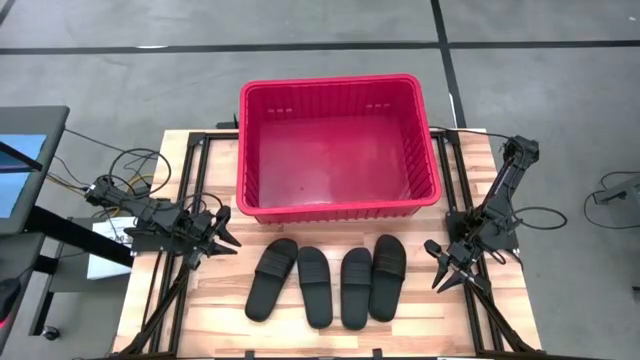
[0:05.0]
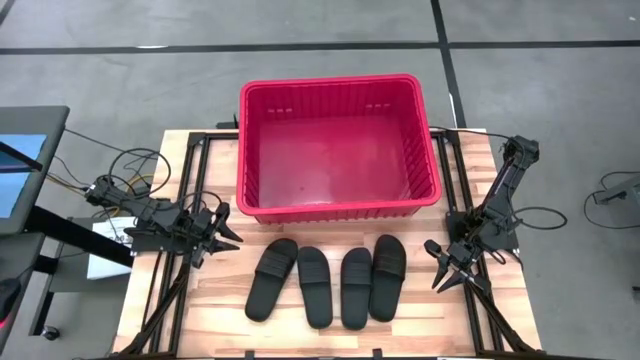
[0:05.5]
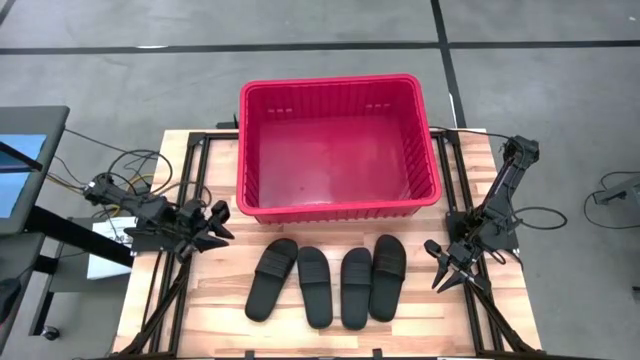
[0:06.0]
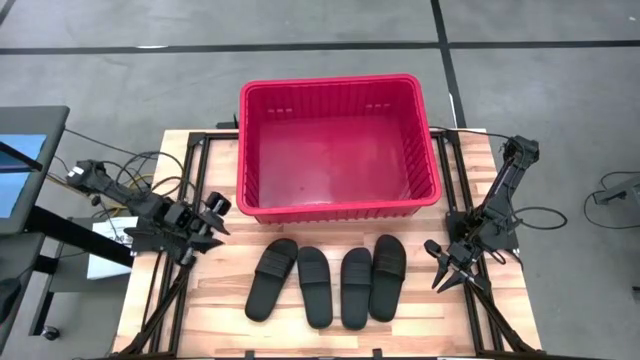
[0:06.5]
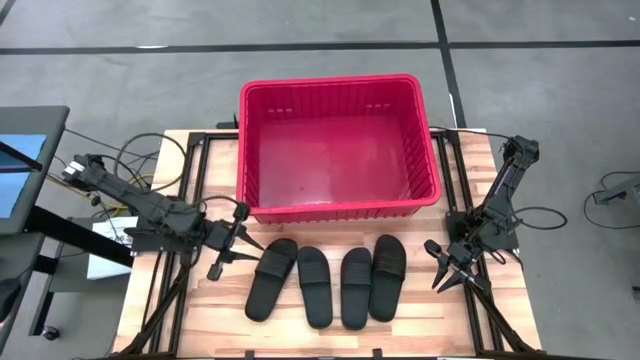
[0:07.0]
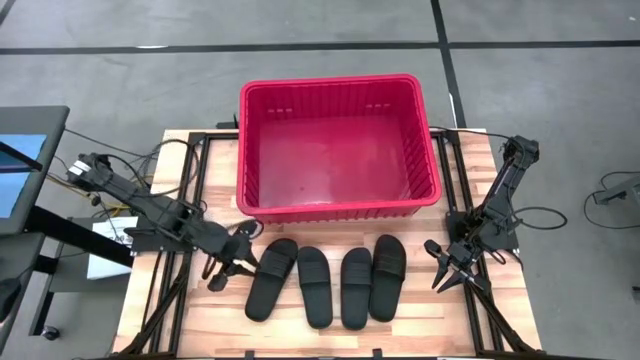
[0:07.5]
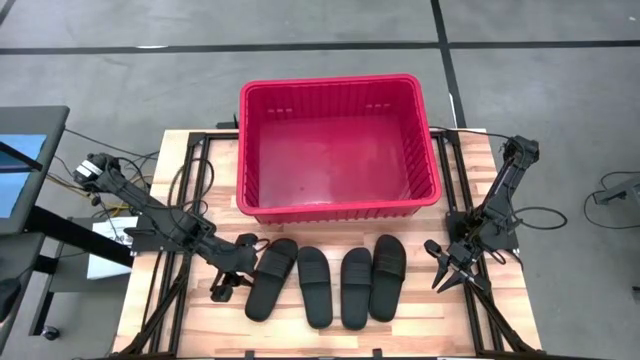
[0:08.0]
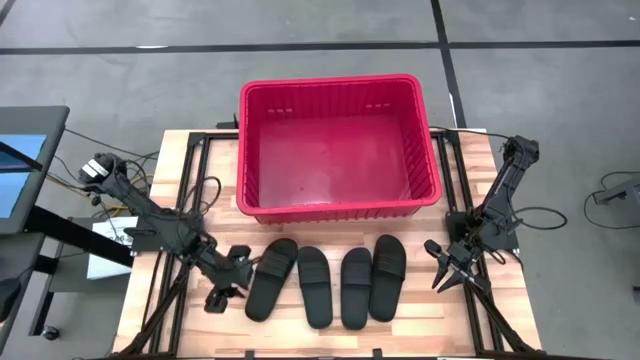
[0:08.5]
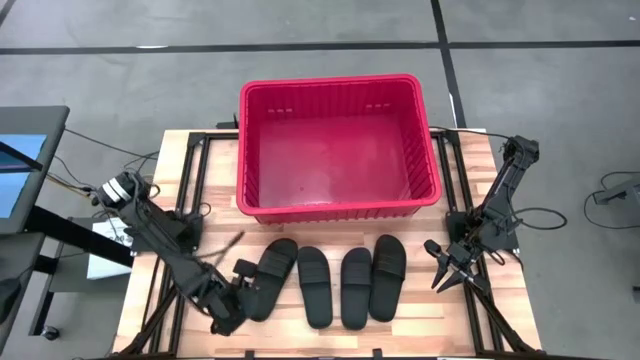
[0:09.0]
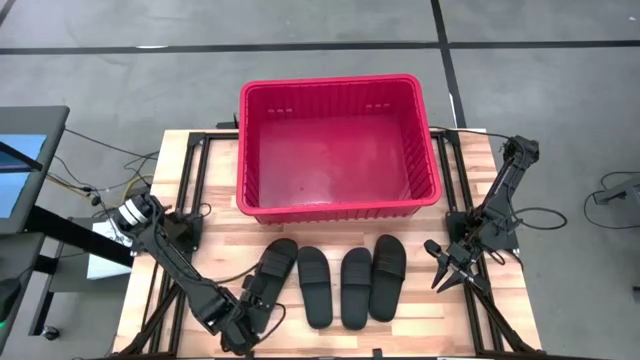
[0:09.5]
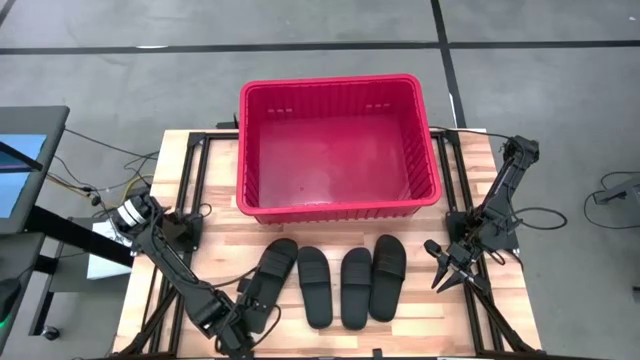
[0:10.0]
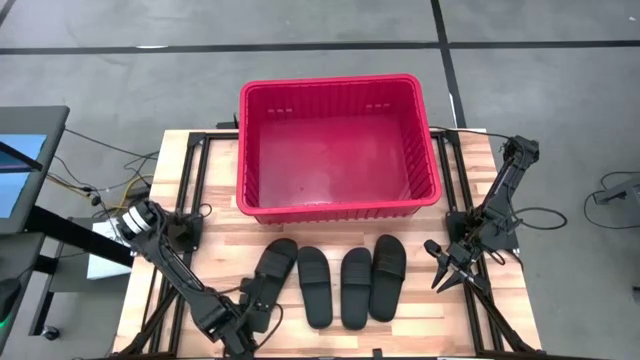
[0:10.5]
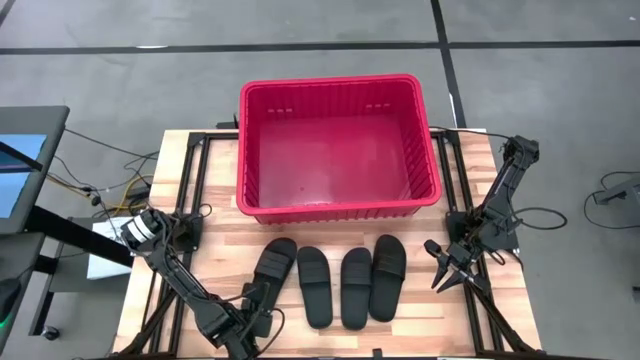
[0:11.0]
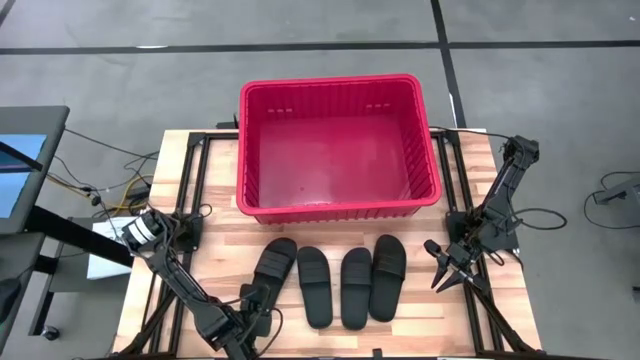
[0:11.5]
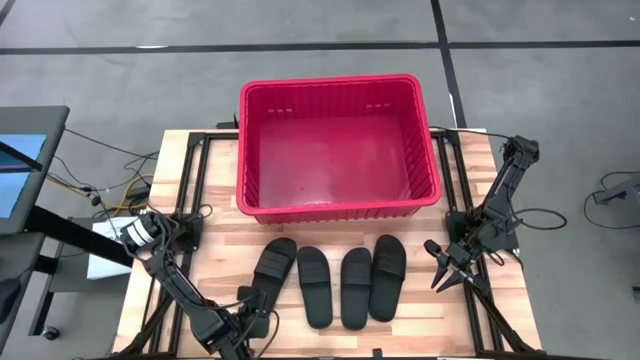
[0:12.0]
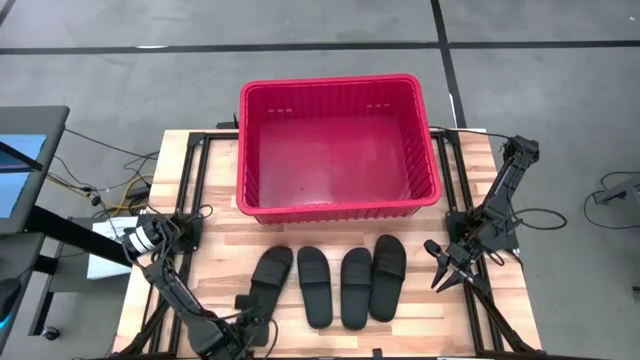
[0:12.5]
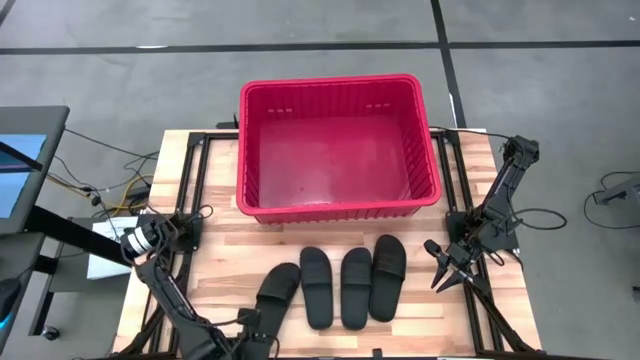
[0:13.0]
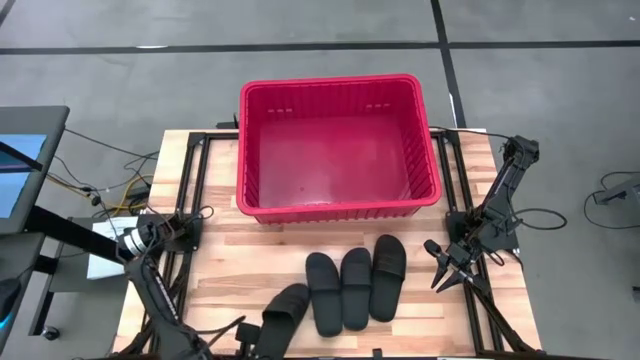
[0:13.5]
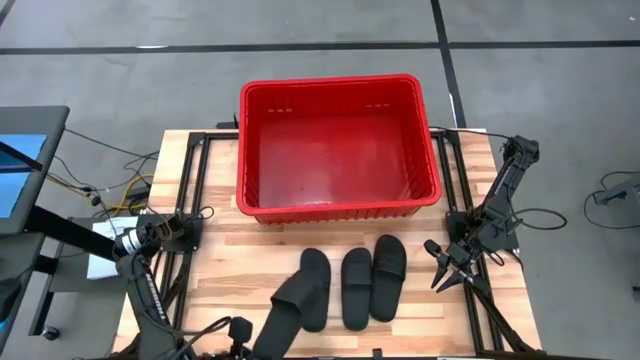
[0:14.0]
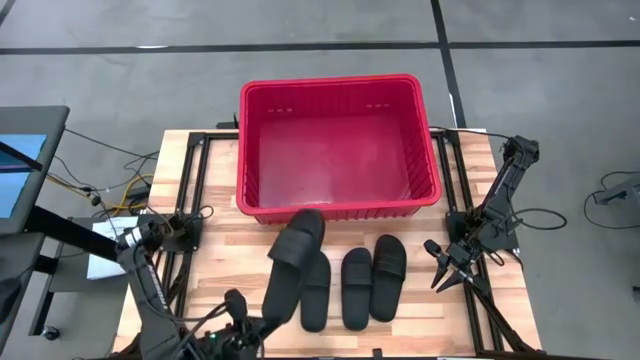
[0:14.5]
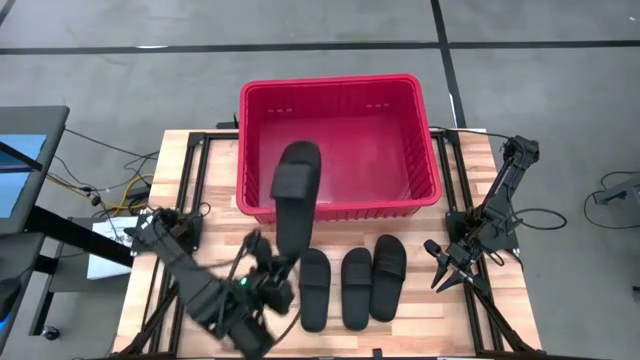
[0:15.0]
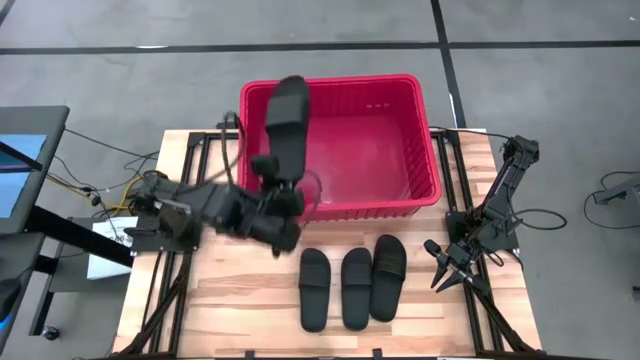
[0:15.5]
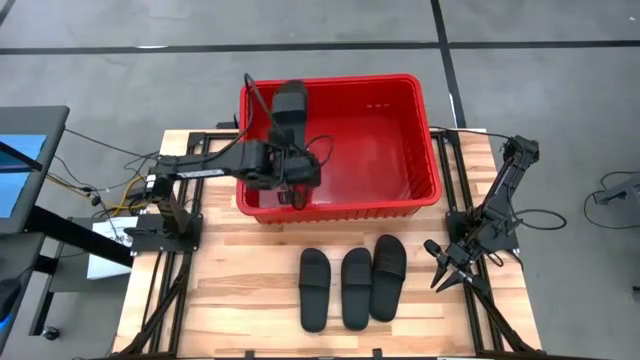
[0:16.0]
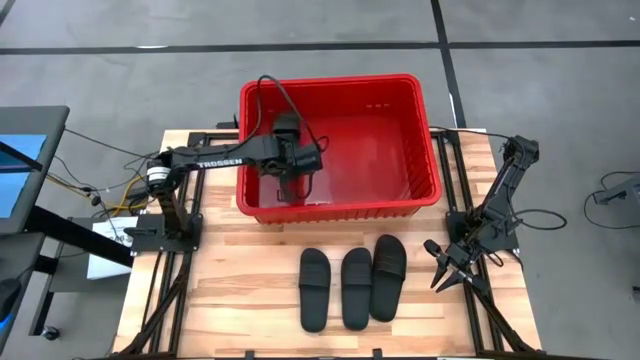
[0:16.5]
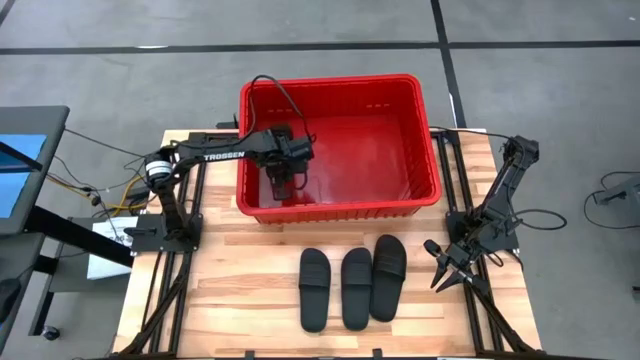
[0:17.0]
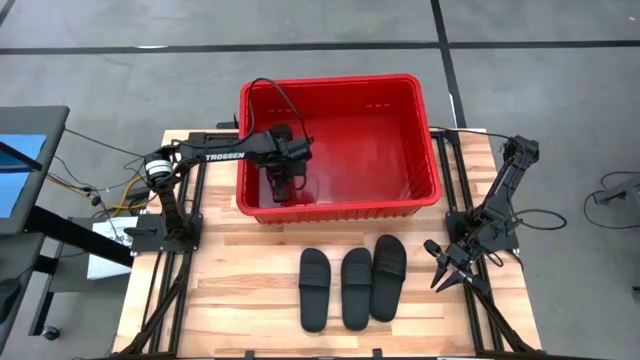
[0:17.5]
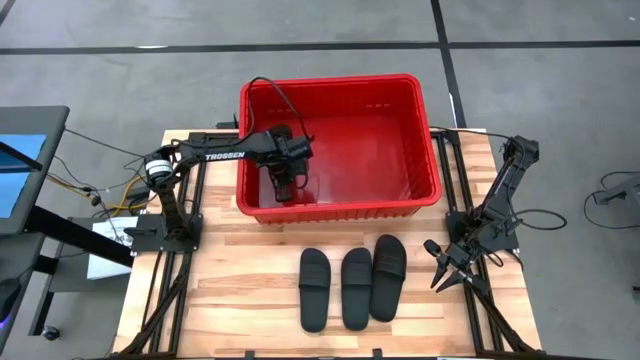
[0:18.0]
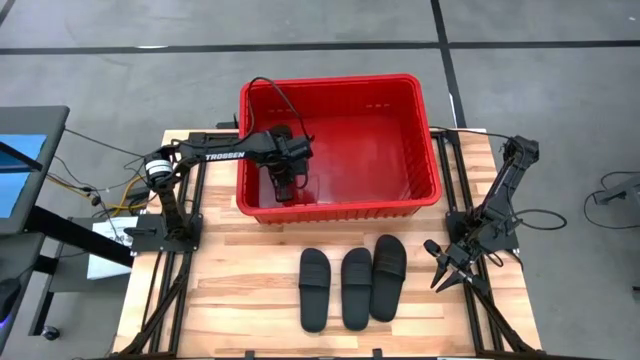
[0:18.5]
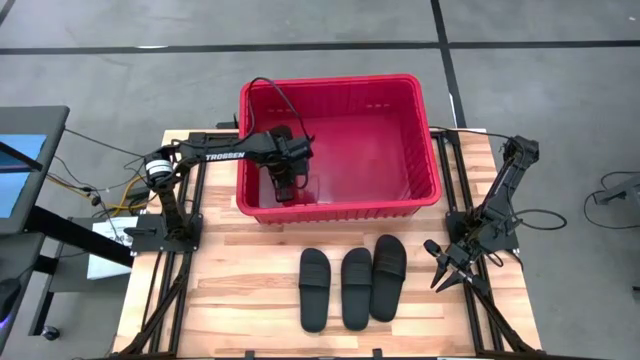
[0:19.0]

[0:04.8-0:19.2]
Task: Pick and place slides into bin
Put the black slides into the red bin

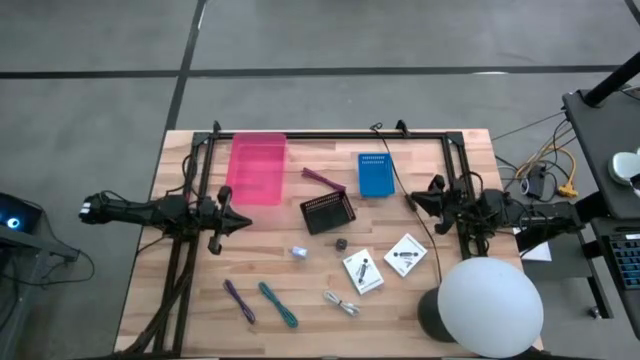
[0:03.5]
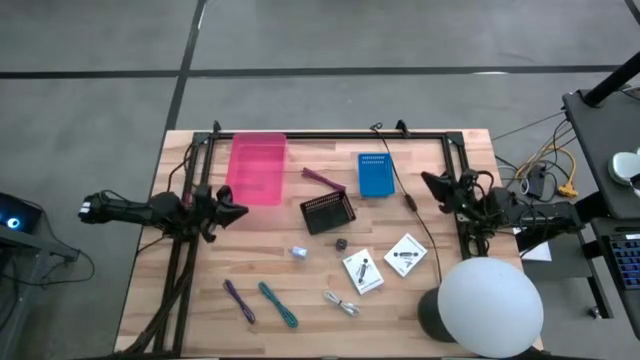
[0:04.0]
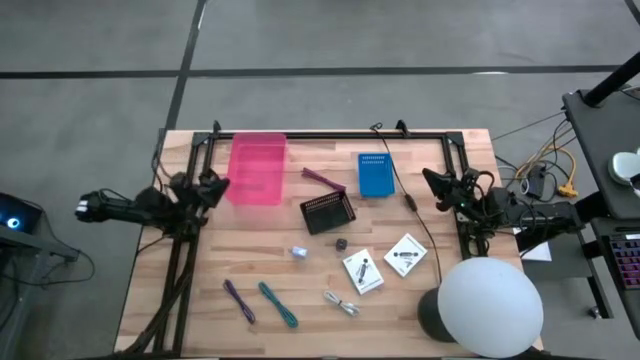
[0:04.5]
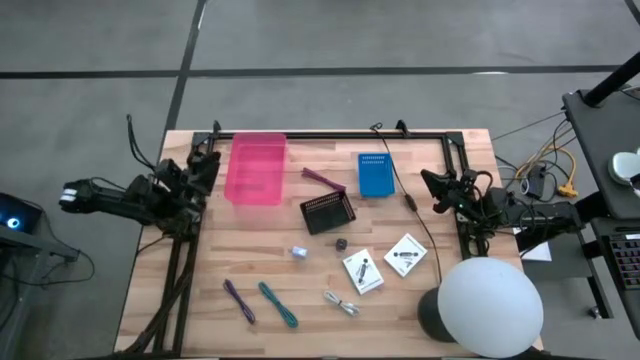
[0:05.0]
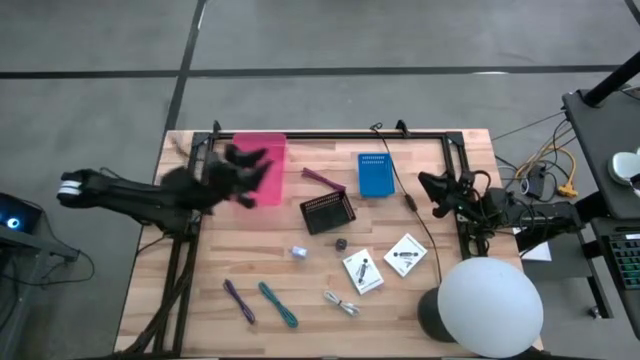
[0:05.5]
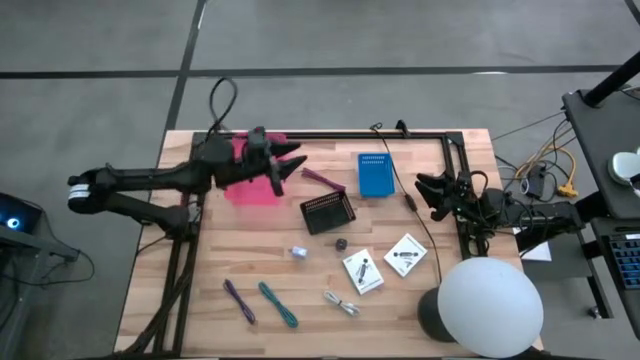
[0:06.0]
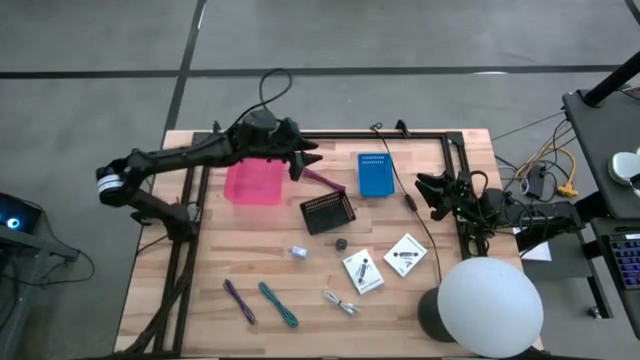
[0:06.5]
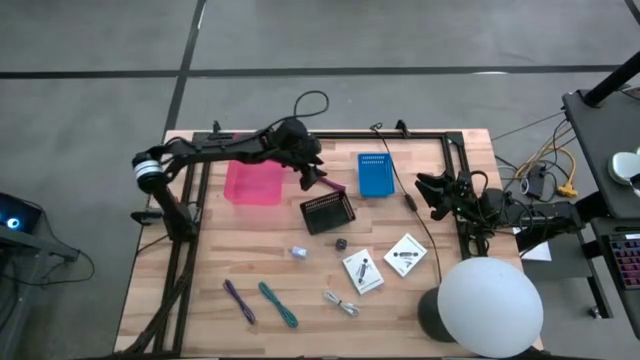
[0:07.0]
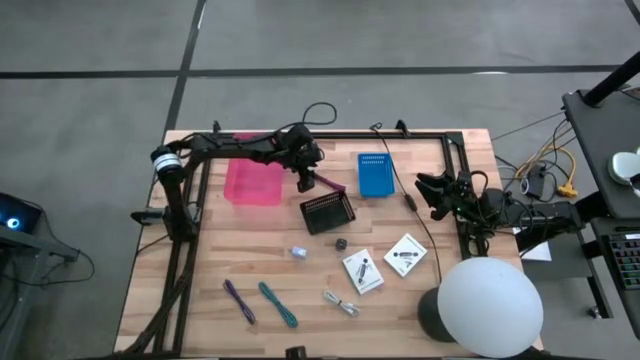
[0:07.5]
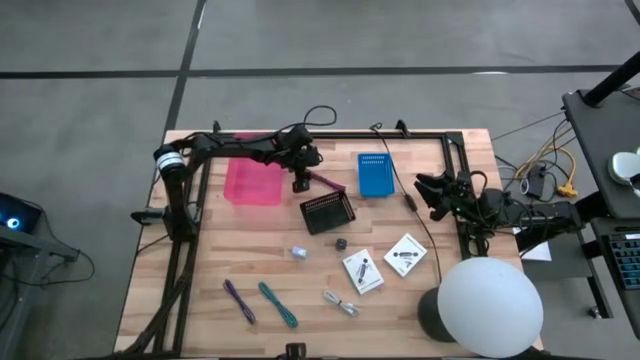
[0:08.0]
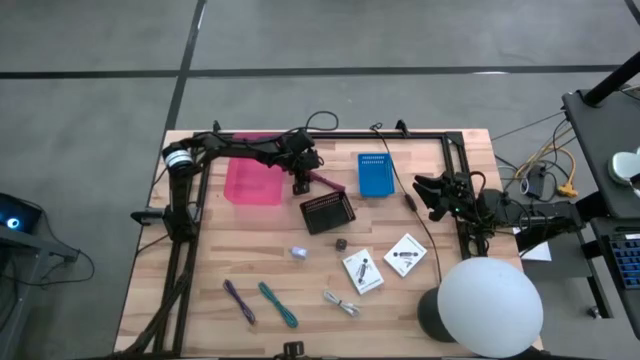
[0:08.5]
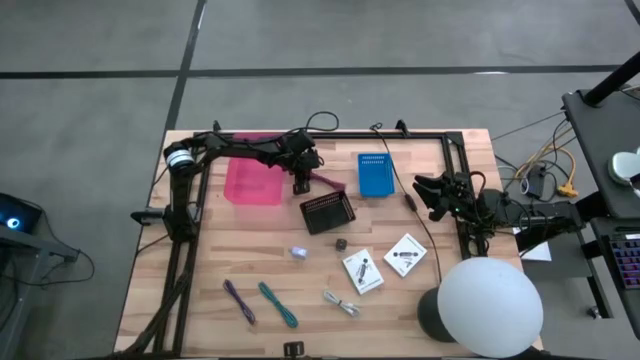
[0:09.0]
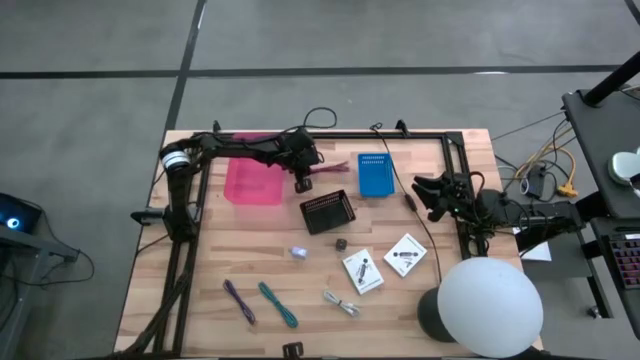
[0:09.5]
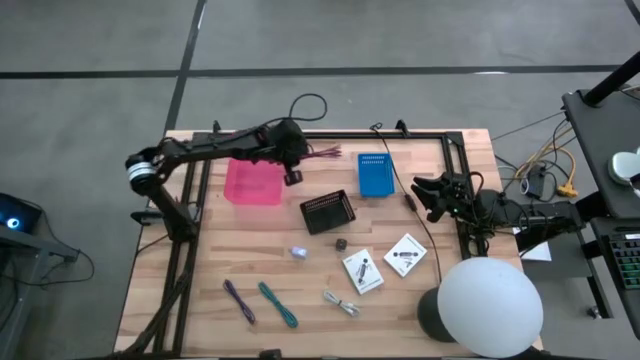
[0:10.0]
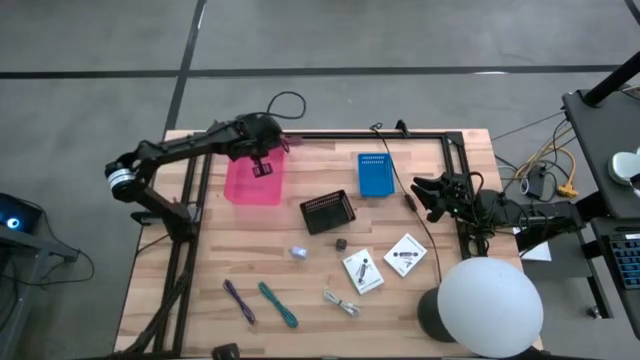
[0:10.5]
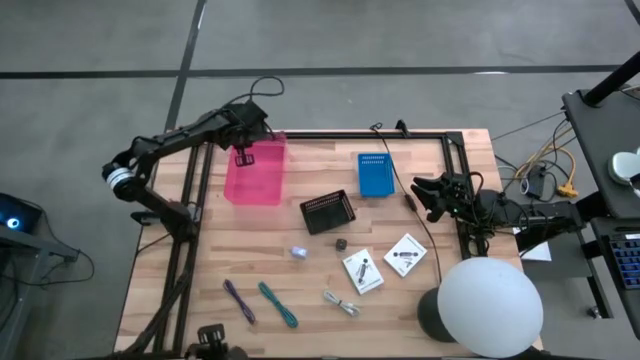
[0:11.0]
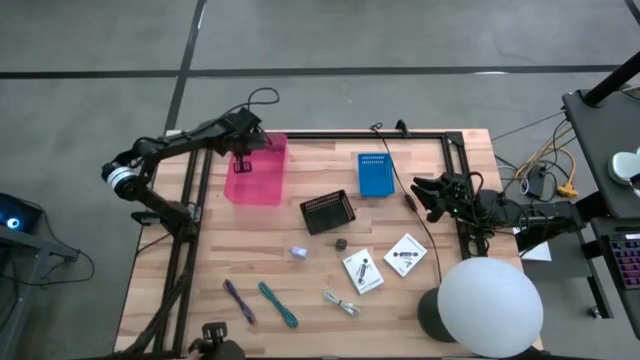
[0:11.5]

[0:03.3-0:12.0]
Task: Pick and place items into bin
Put the pink charger cable into the pink bin
